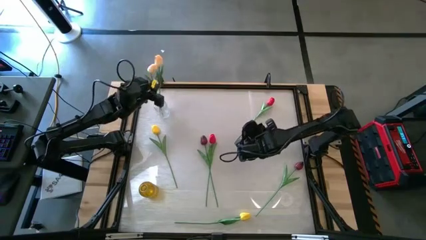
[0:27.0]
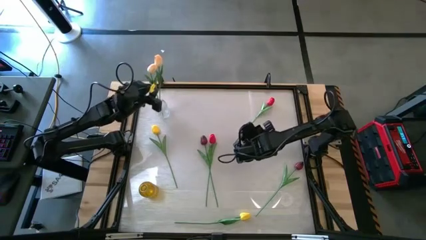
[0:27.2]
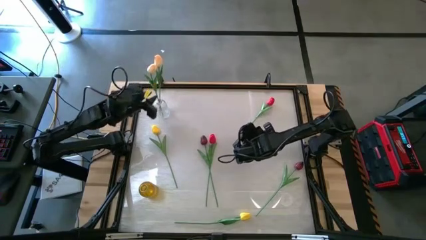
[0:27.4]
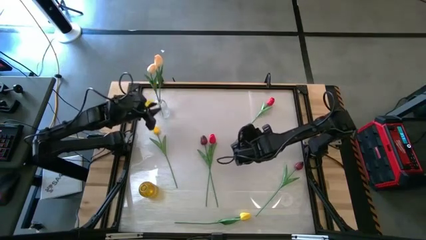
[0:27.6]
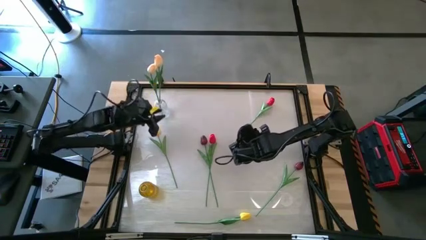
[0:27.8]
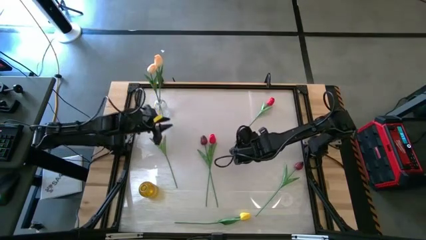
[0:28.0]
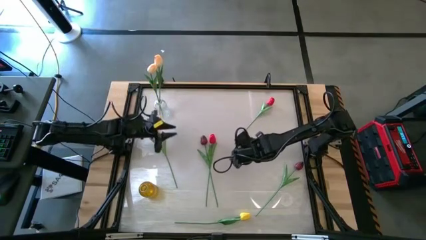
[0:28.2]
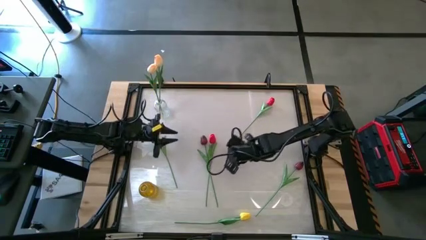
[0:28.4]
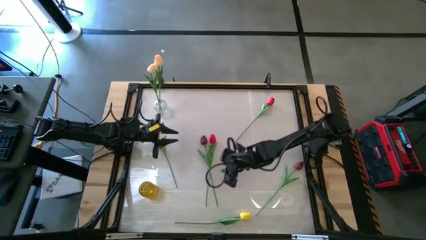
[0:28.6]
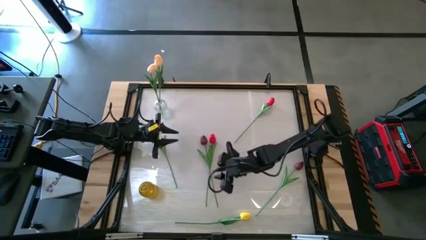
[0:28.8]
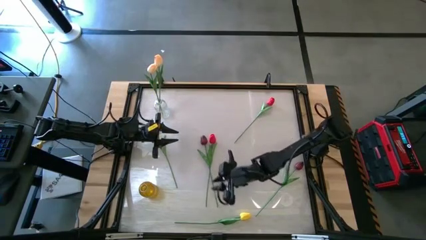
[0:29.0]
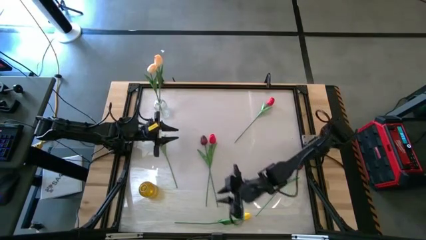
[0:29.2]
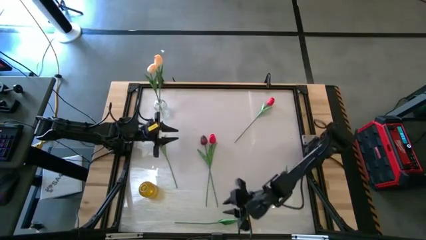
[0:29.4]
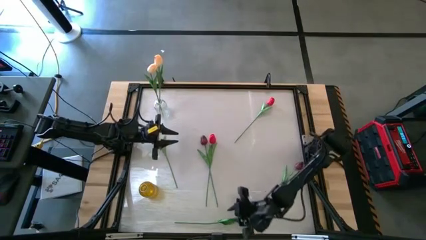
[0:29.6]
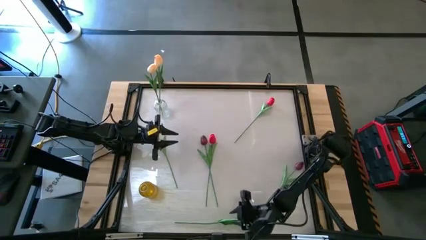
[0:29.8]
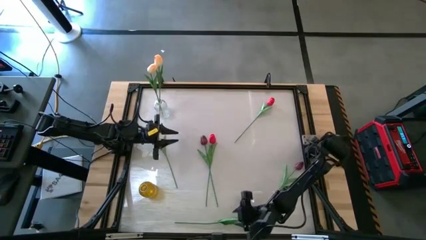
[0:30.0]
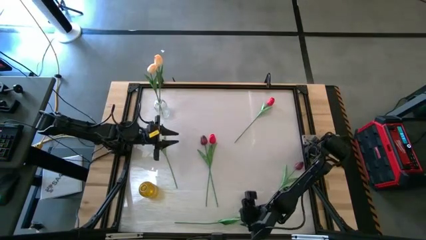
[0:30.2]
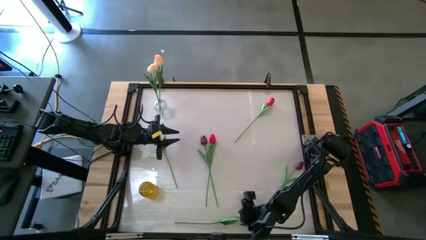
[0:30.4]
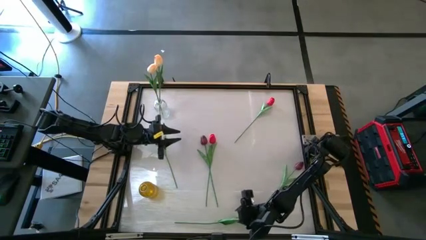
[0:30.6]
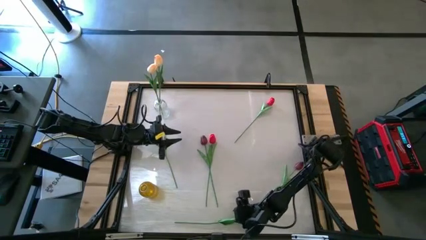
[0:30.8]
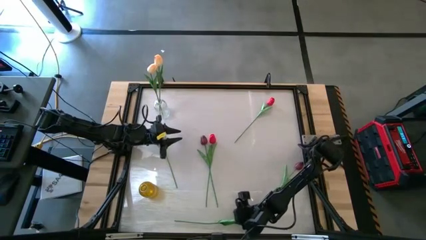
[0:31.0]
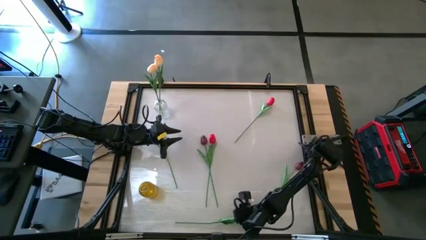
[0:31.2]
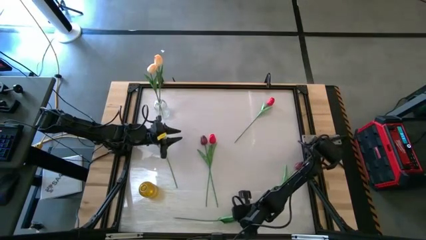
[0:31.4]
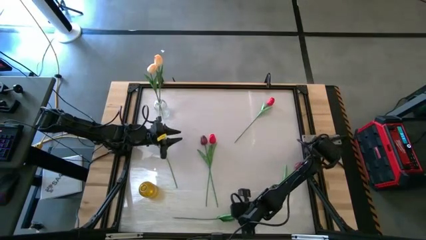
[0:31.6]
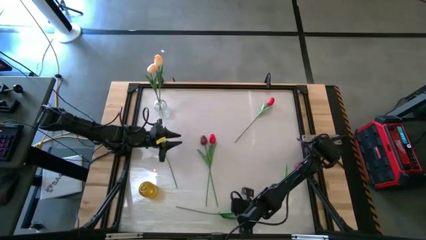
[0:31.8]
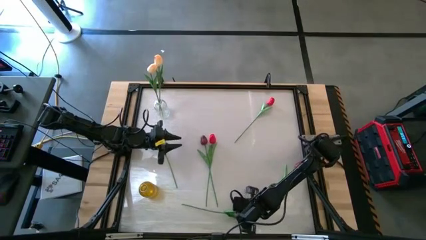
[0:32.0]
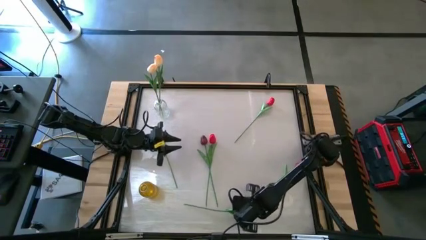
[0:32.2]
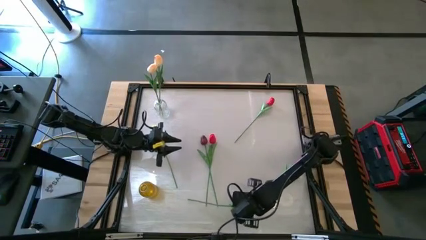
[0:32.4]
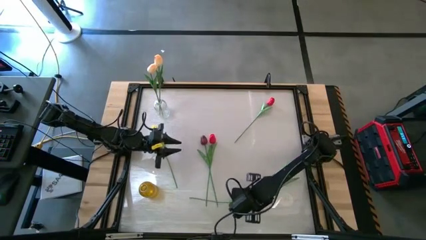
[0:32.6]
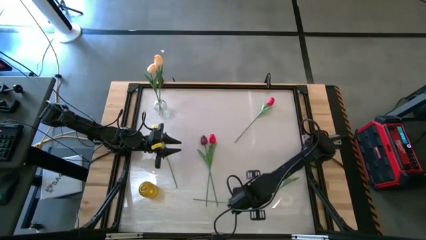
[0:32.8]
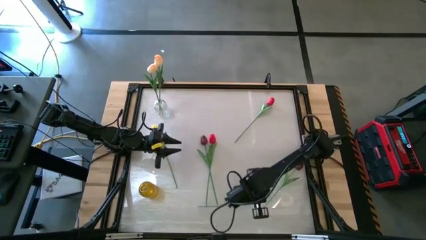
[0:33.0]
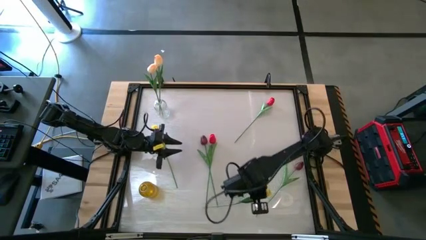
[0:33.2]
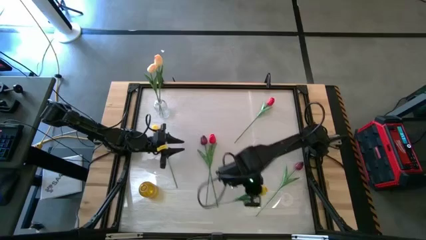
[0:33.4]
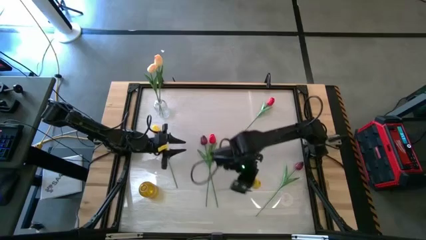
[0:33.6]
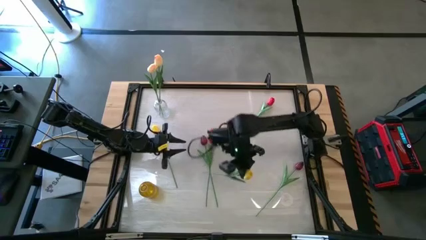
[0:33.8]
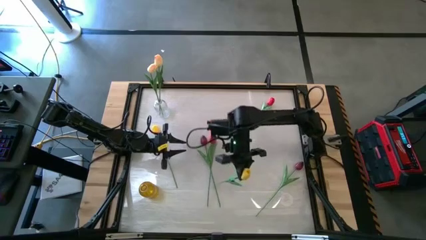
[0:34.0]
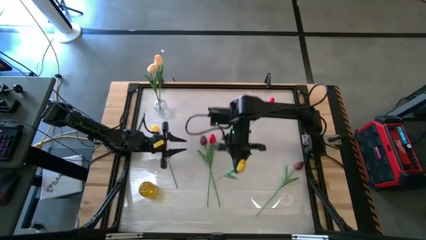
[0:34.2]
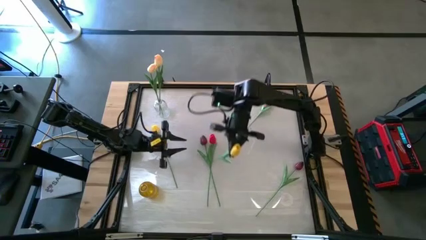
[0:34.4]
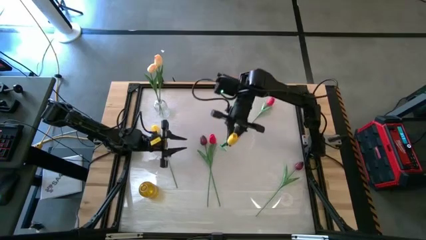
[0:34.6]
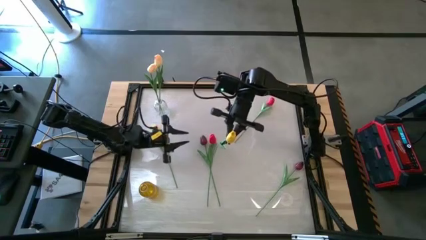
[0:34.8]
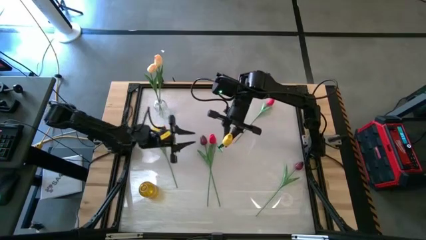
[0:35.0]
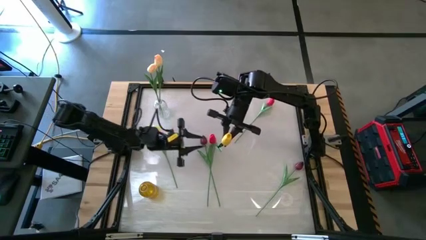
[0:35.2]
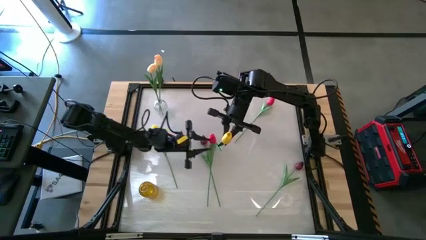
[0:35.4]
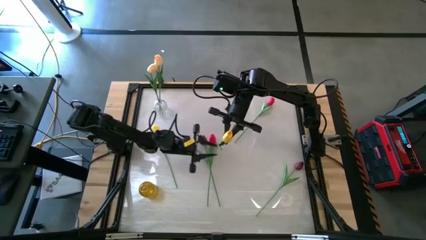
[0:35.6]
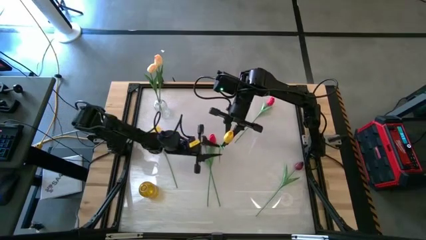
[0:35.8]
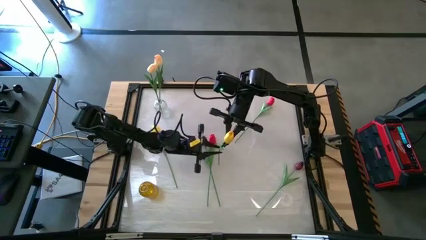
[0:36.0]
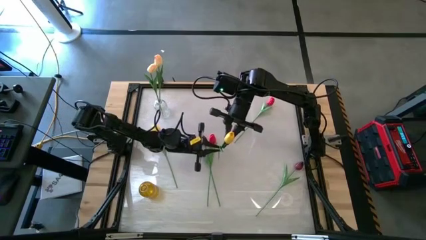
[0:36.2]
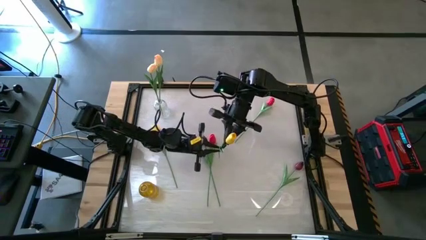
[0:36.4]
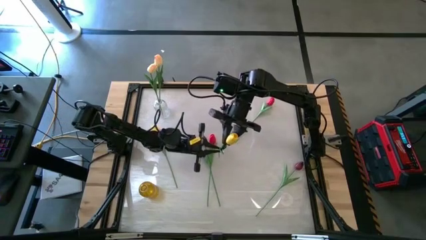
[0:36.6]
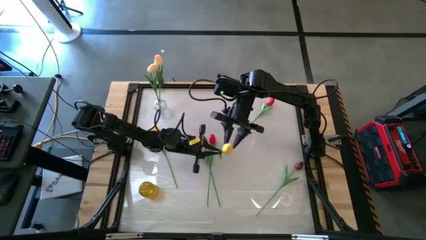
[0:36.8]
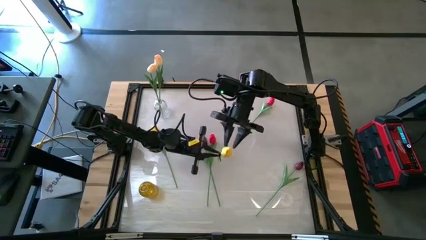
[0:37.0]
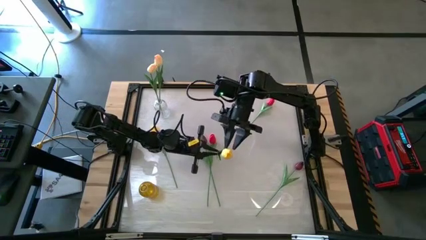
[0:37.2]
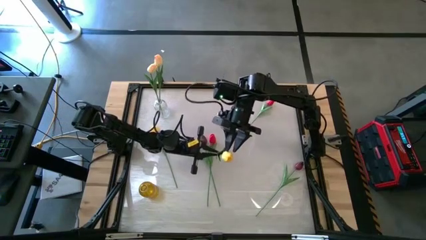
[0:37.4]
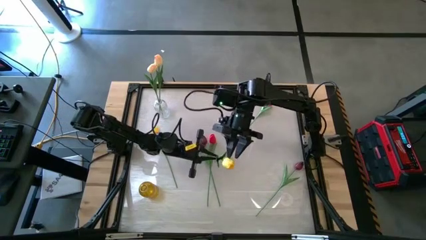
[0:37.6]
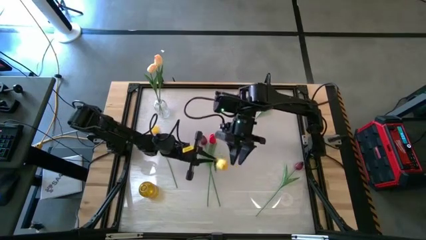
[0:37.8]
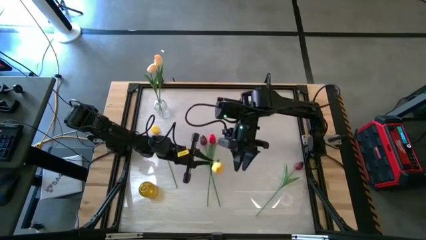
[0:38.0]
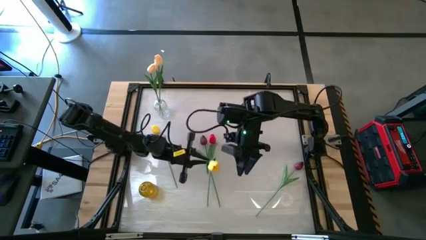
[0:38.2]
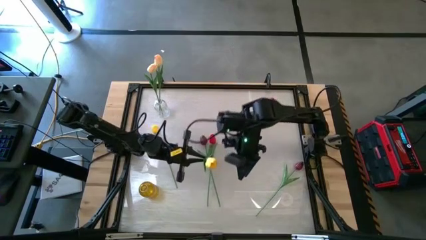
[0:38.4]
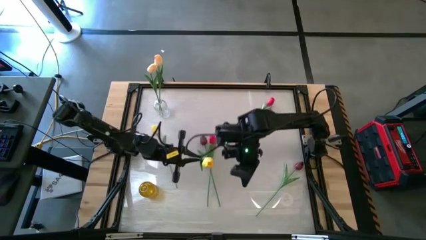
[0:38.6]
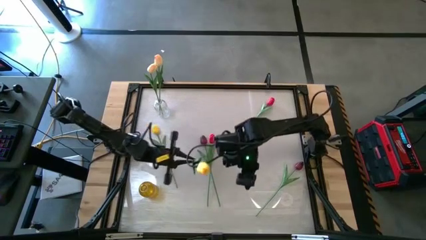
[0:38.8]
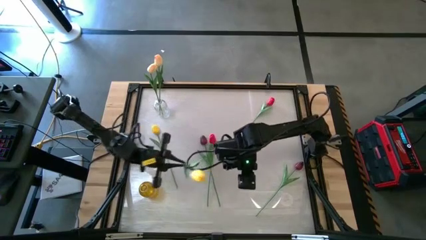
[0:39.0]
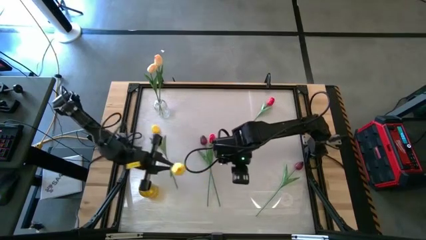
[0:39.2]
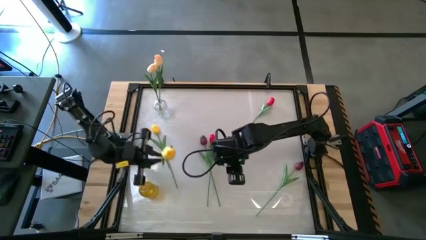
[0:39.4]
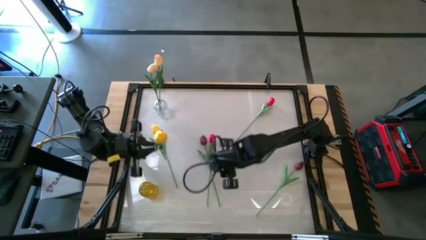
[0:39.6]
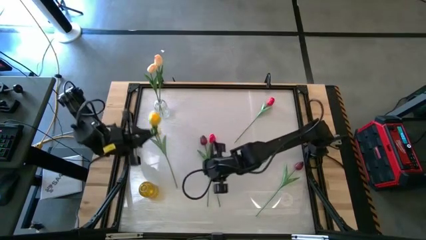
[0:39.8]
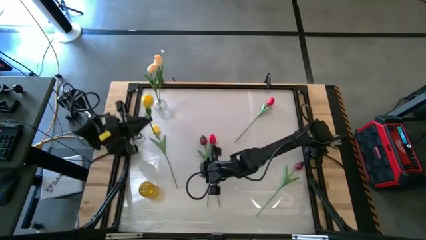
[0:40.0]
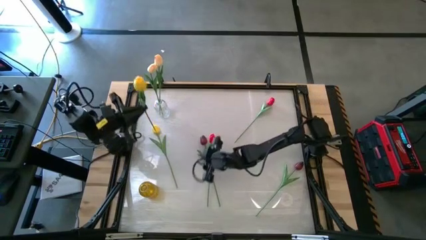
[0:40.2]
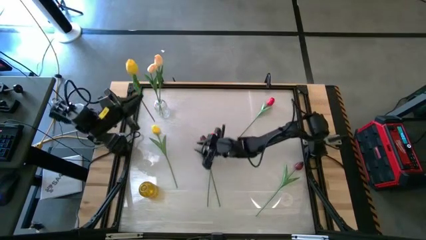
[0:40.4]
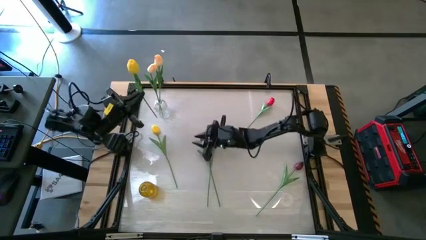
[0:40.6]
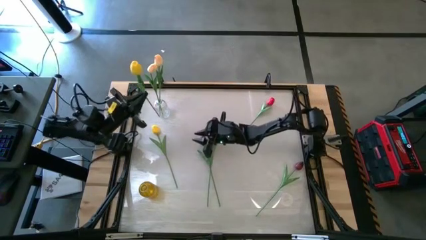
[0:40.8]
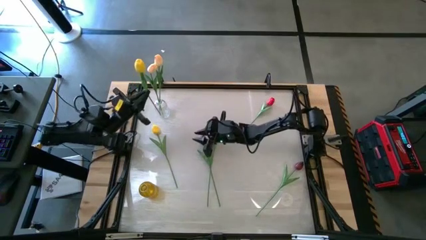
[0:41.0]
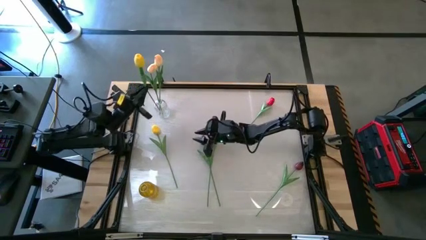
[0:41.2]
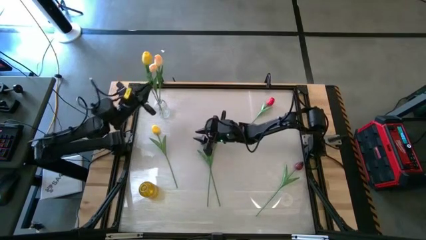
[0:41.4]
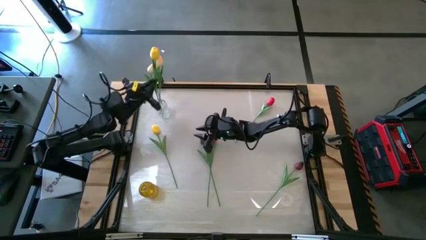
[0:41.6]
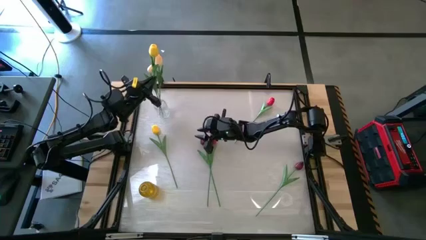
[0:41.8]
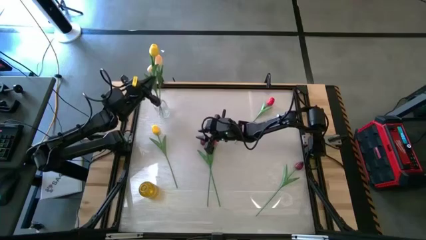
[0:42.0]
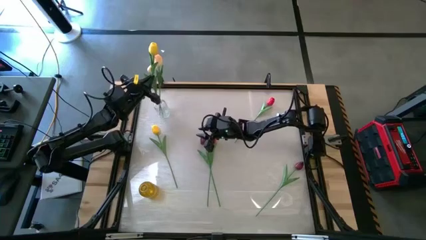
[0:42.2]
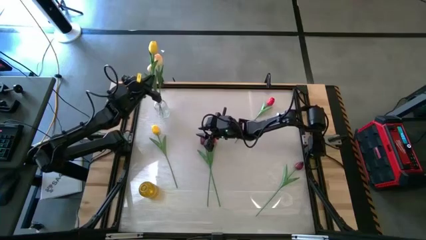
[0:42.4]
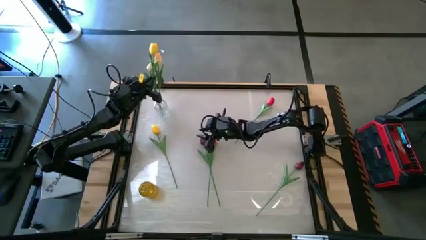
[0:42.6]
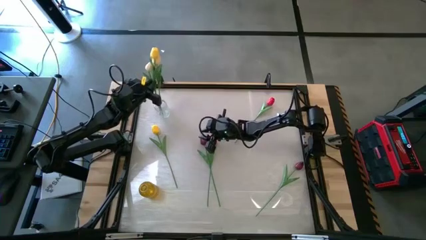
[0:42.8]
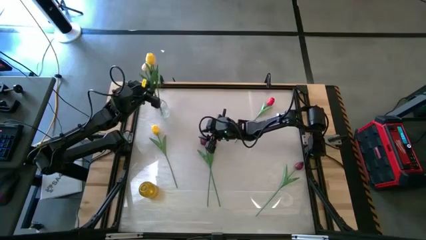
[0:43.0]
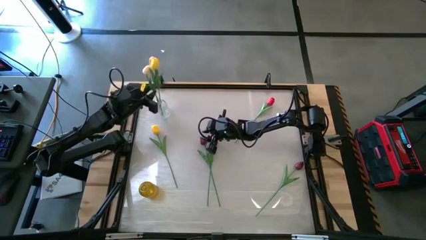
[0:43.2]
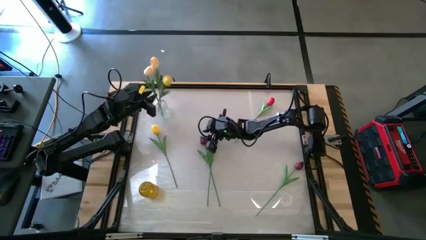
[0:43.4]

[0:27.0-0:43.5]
Task: Sort flowers into vase by color
Put the yellow tulip into the transparent vase
